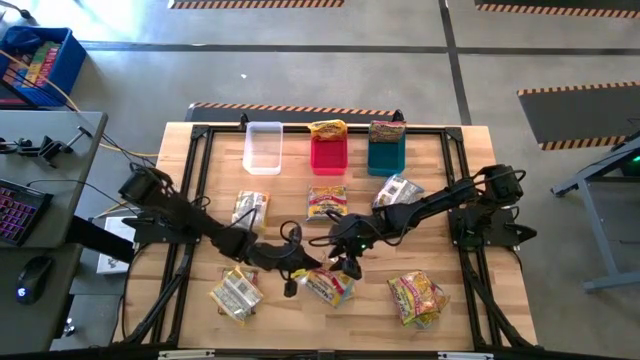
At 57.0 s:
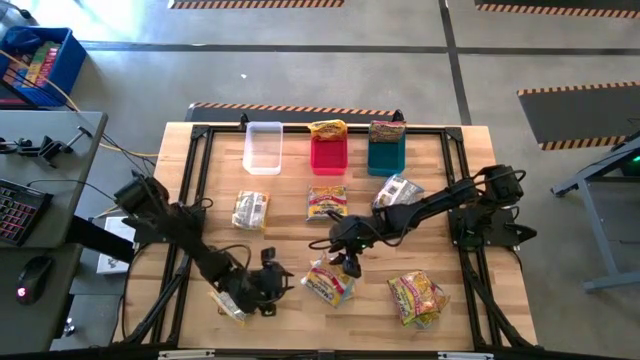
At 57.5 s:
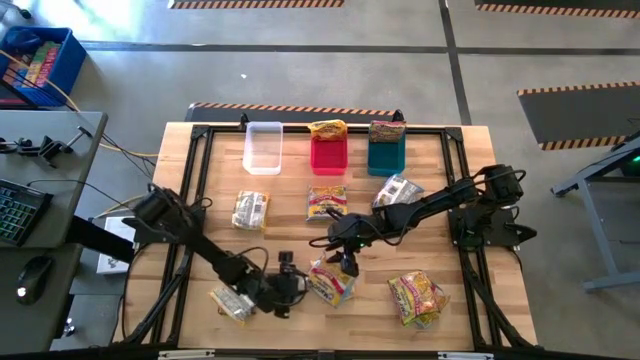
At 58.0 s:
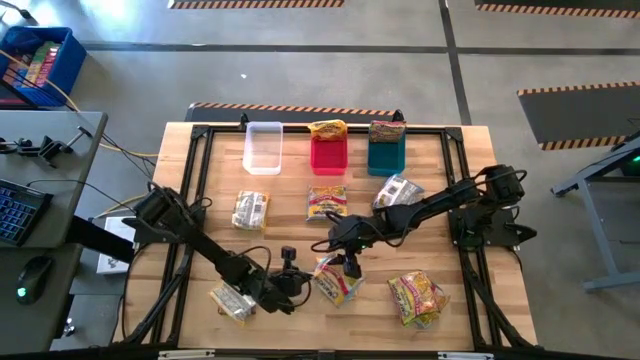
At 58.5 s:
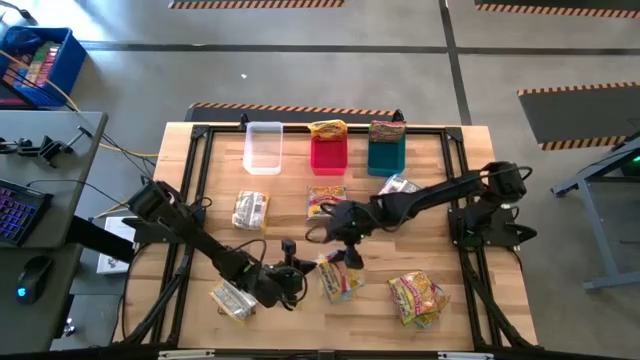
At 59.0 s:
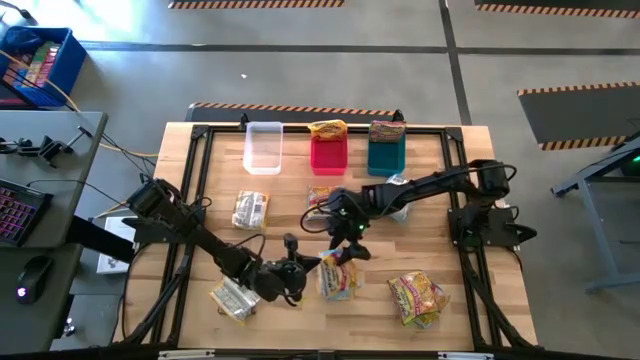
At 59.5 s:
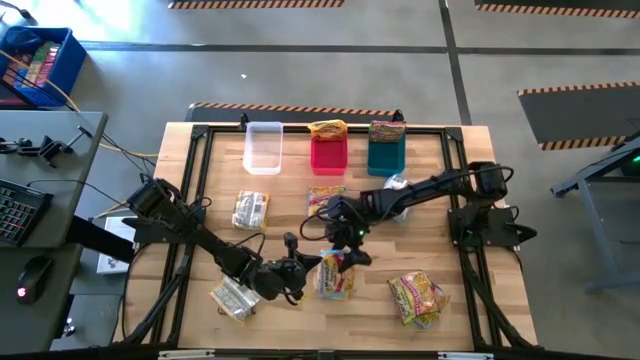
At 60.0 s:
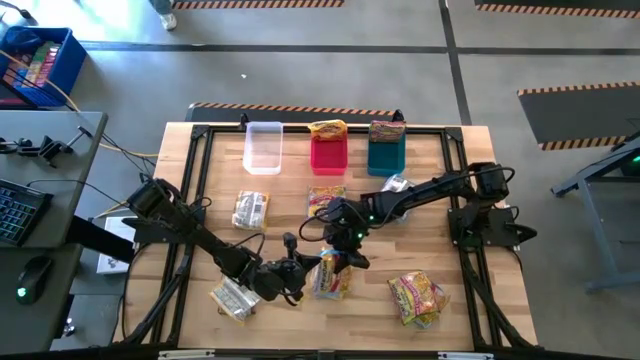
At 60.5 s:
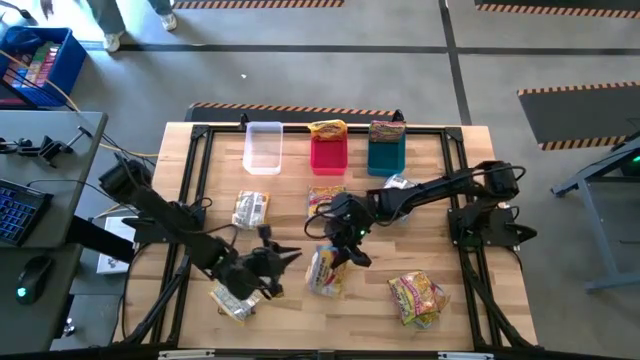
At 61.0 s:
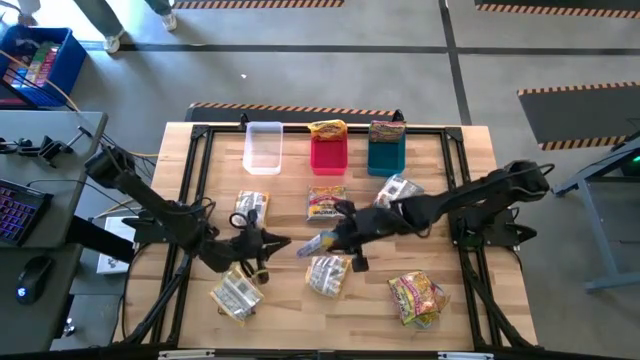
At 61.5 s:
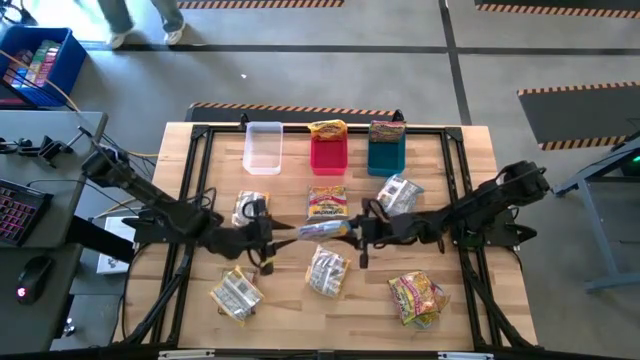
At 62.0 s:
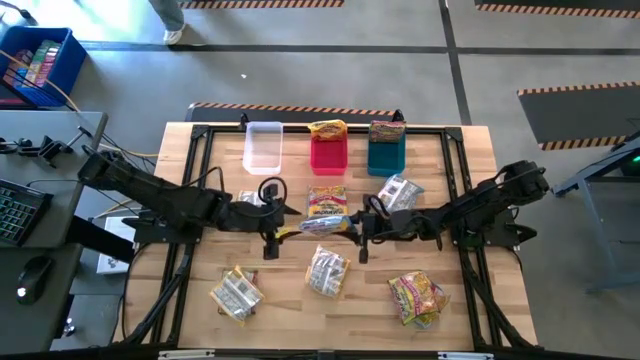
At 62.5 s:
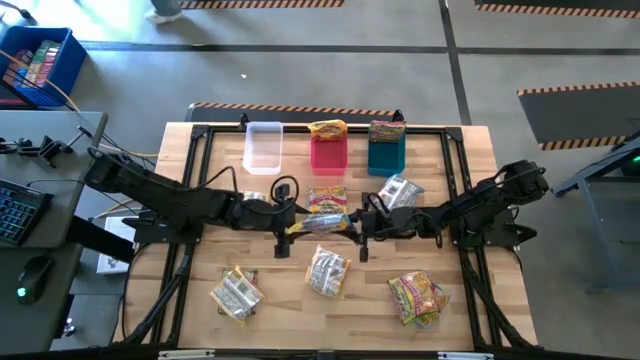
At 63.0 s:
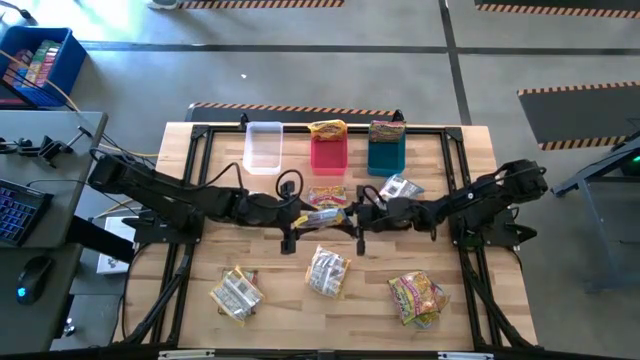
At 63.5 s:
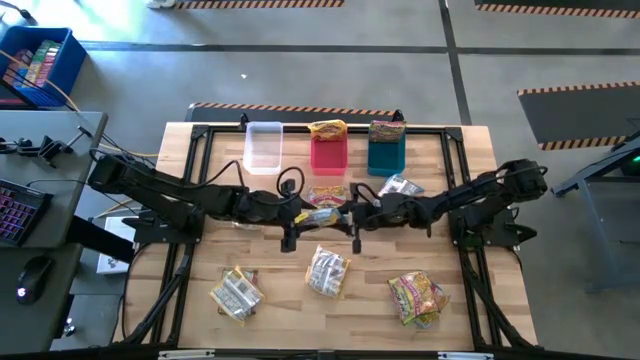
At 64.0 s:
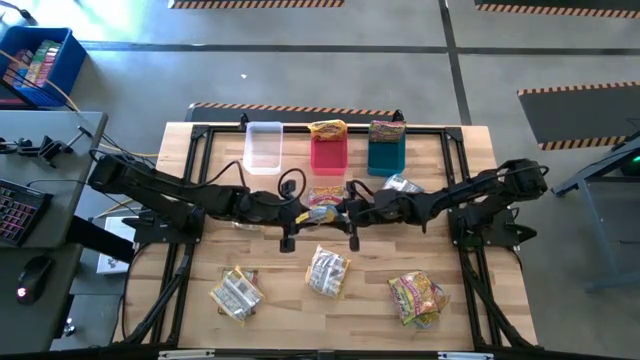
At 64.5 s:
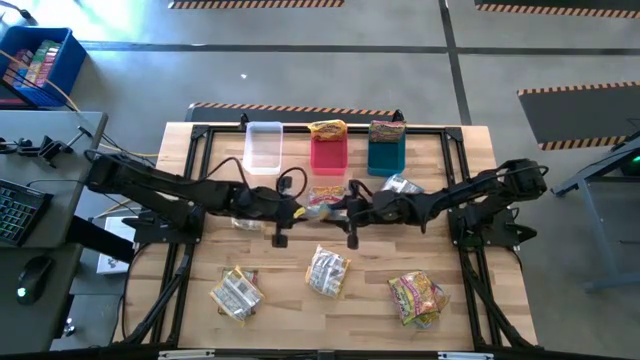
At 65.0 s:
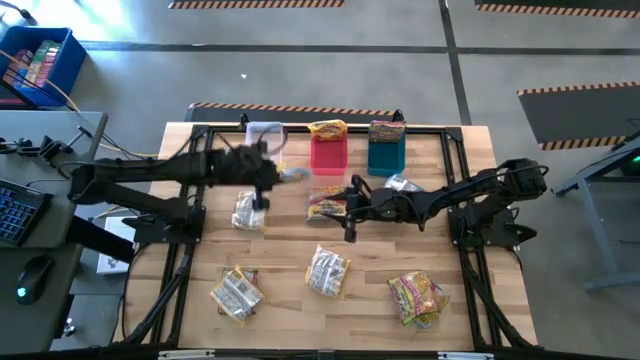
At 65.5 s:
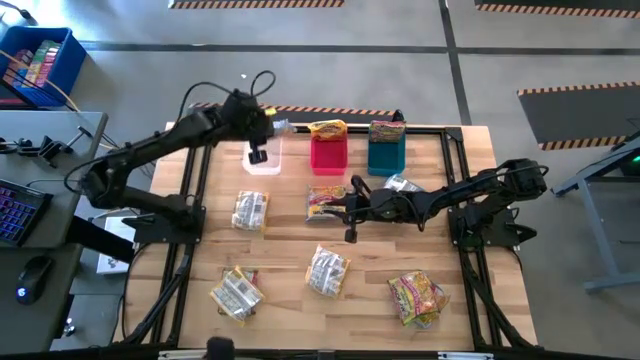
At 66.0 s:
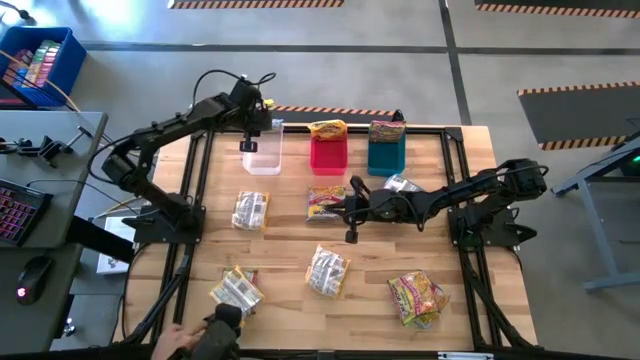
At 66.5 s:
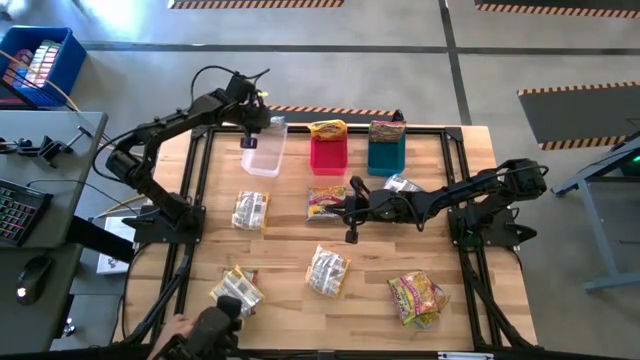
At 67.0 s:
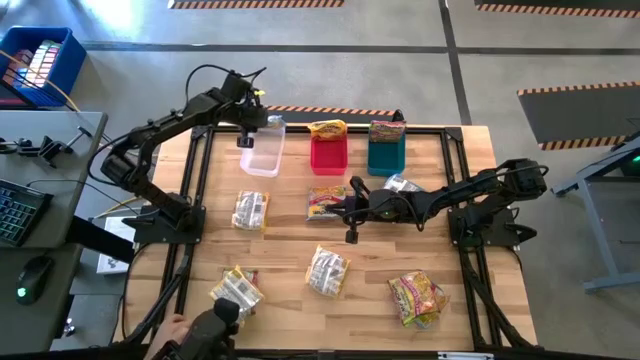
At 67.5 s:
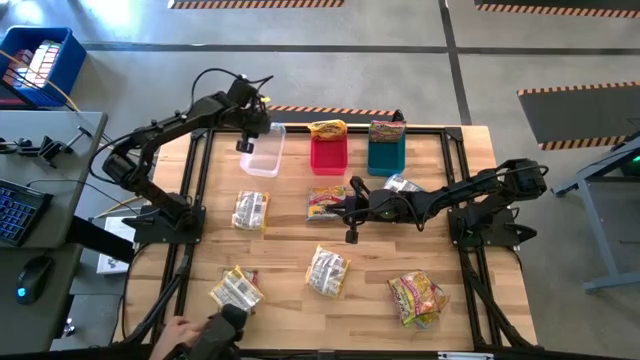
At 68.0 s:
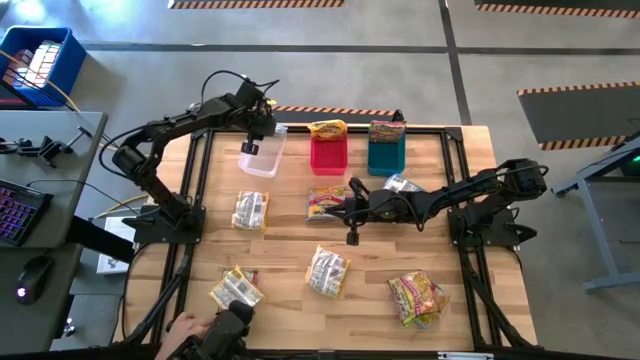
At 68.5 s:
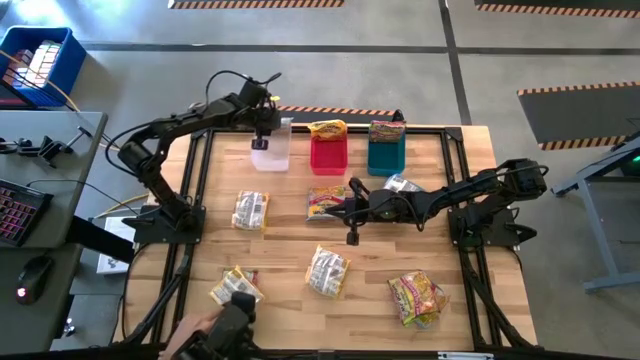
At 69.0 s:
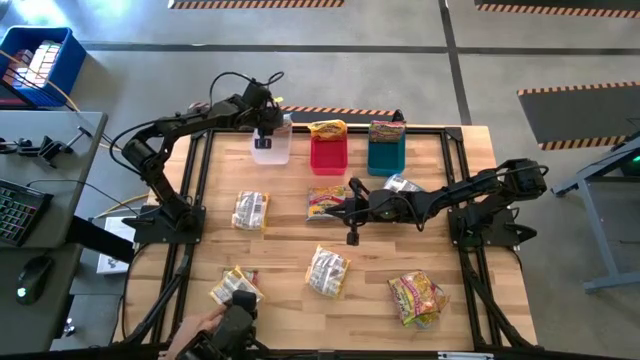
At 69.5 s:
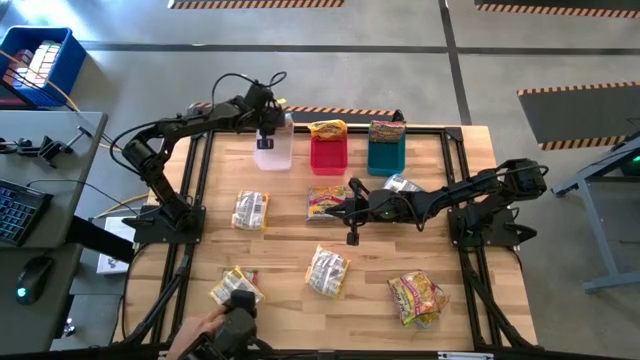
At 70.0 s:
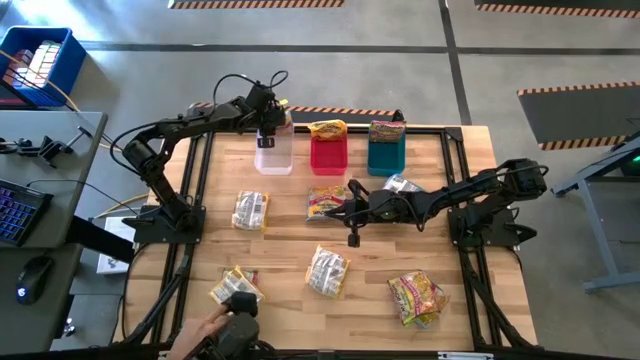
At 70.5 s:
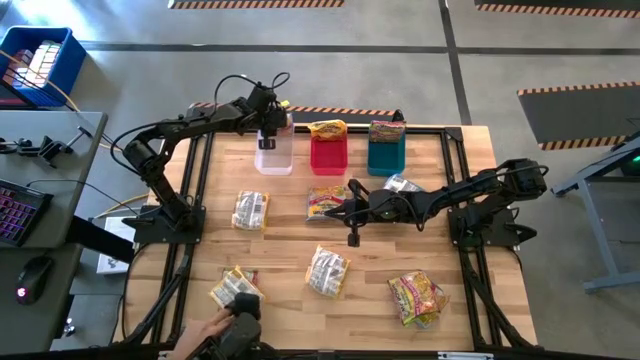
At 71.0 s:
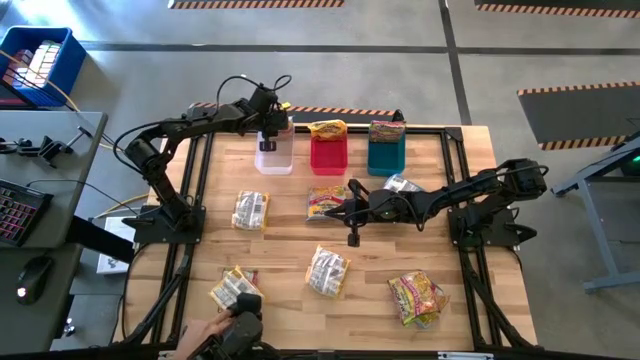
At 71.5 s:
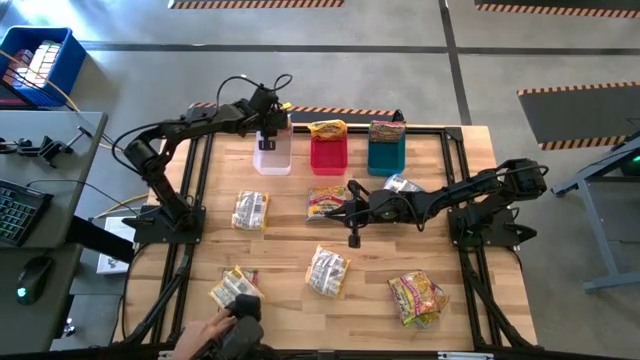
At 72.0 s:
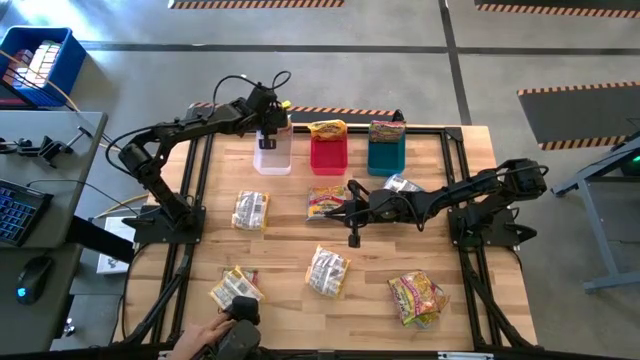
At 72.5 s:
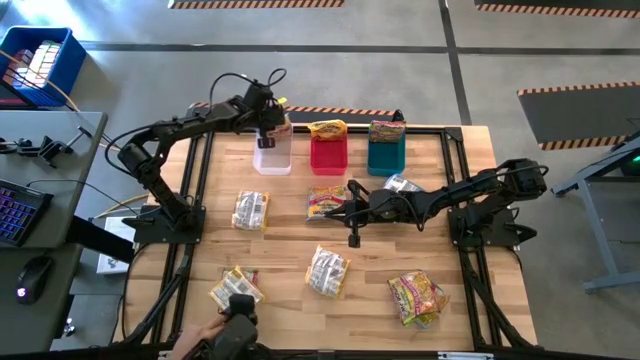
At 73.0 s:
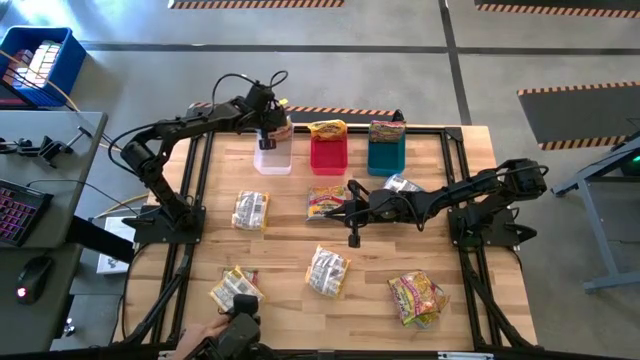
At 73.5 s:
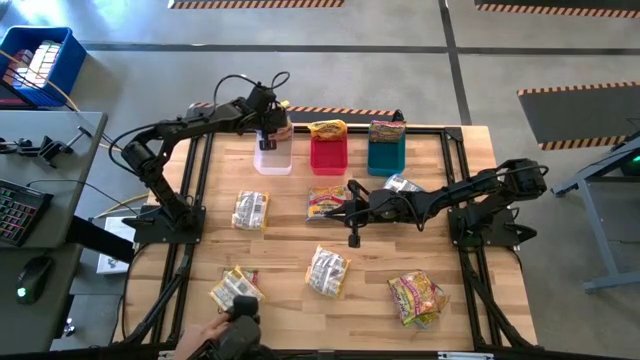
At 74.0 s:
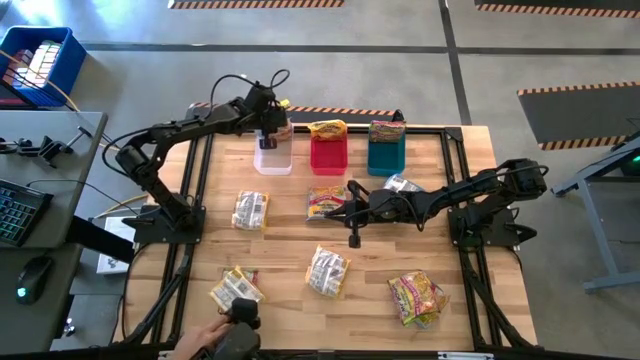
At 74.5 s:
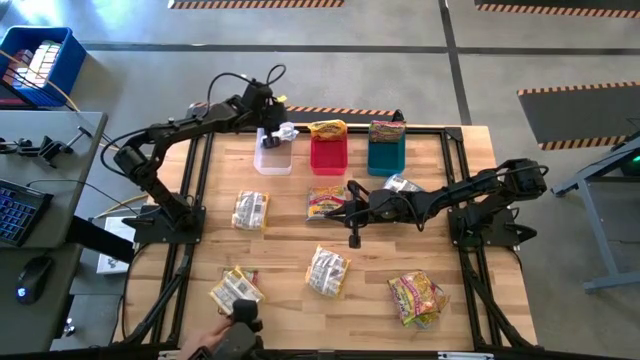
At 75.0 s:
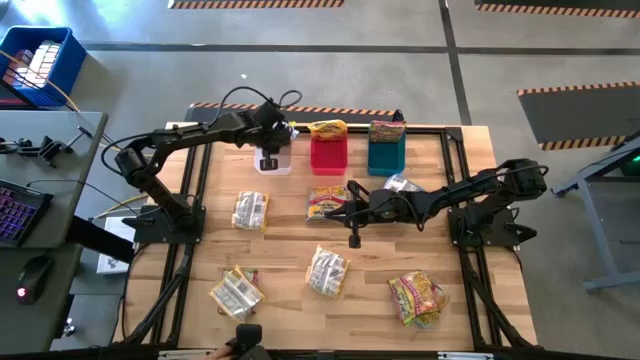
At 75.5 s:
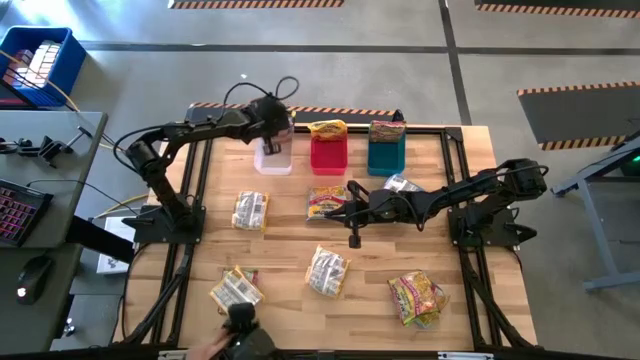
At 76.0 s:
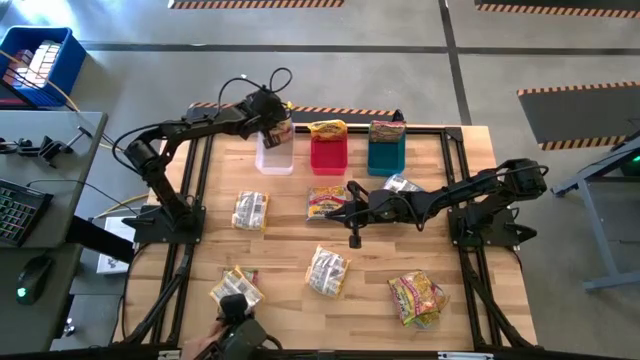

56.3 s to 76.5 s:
Task: Sort Maruchan noodles
Put the blue noodle pack into the transparent bin

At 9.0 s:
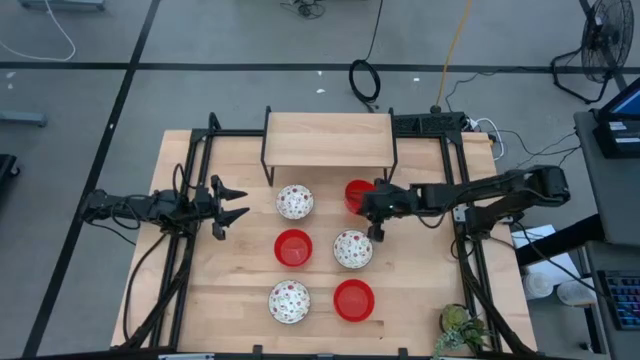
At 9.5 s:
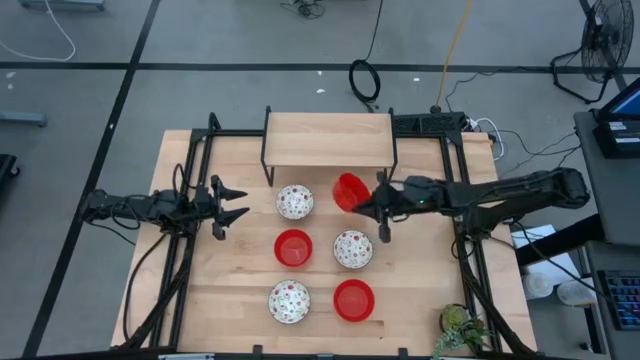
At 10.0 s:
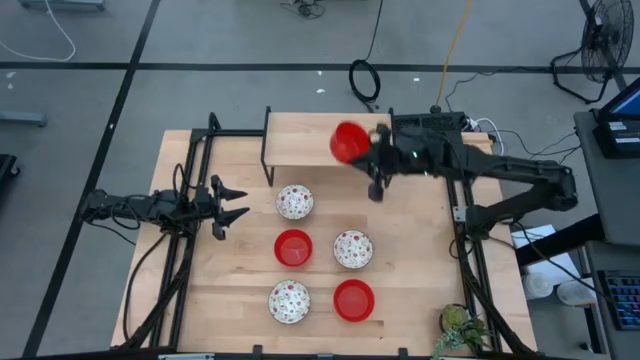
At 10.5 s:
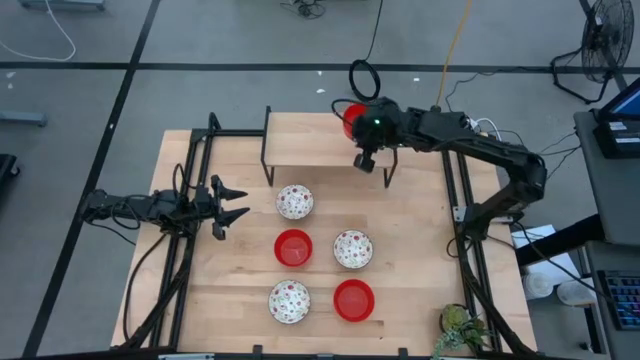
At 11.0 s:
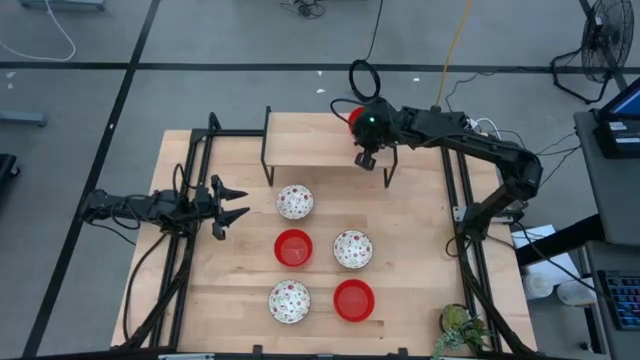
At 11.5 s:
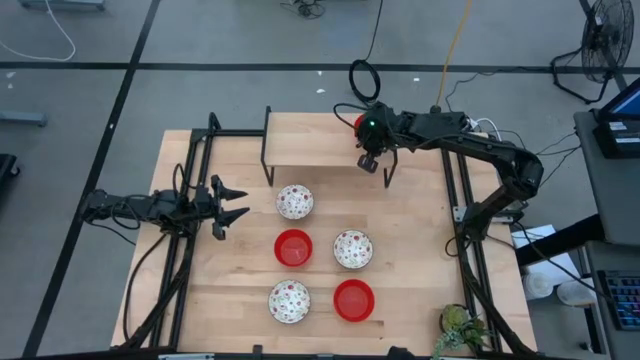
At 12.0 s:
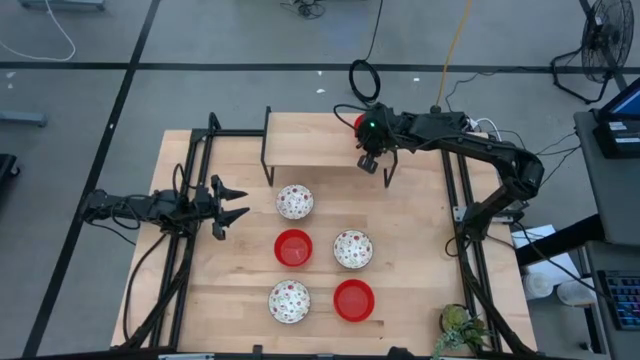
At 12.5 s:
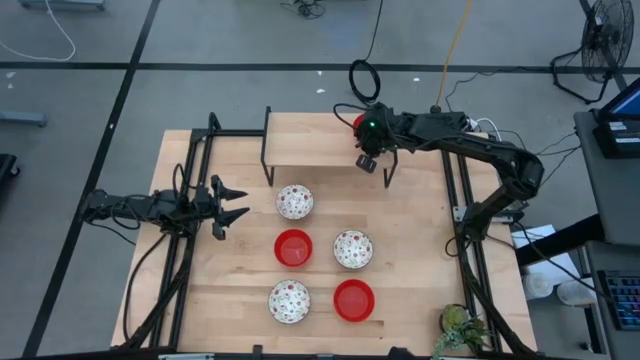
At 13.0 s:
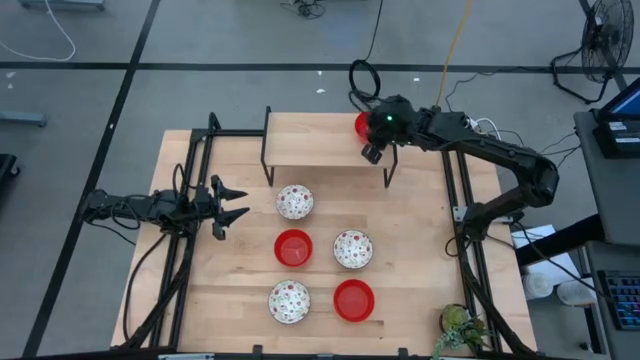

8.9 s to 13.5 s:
Task: Pick & Place Mini bowls
Put the top red bowl on the shelf
